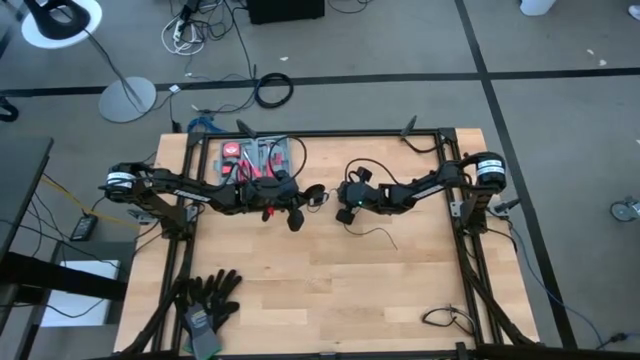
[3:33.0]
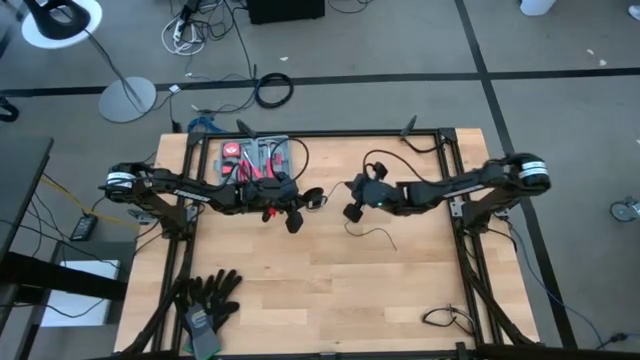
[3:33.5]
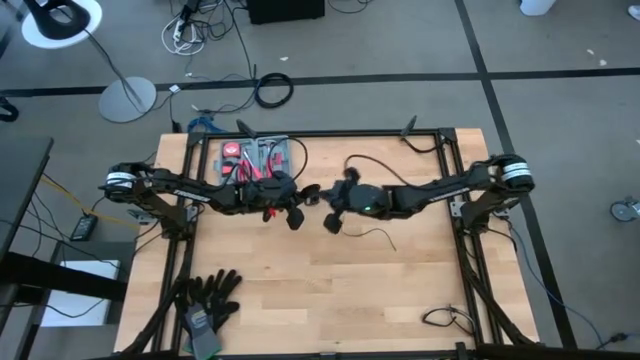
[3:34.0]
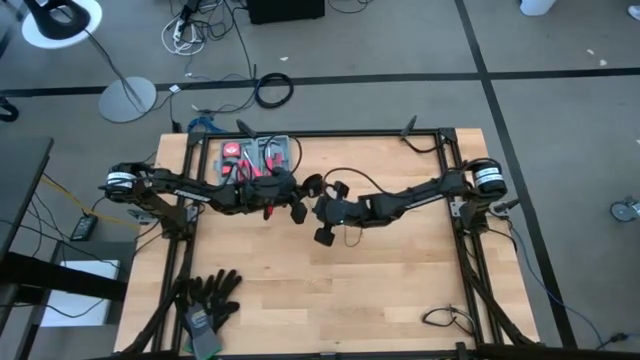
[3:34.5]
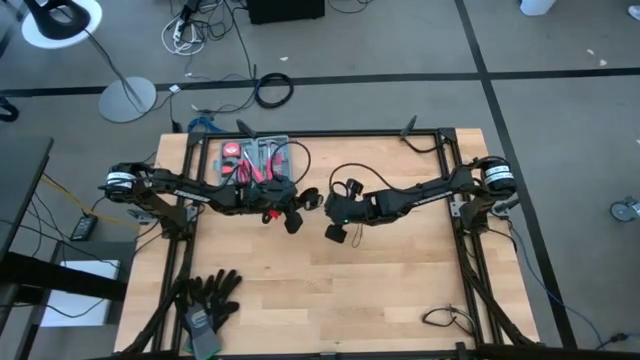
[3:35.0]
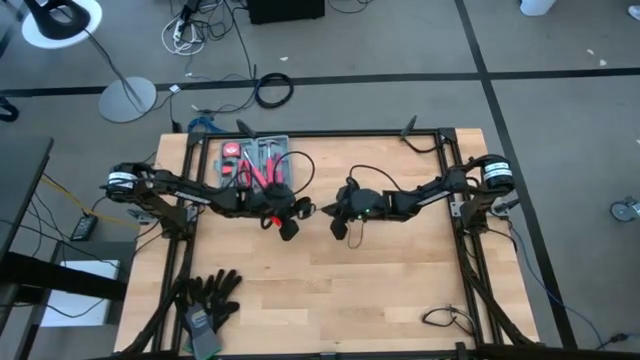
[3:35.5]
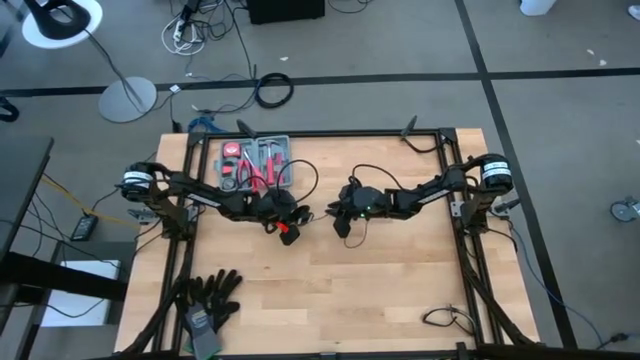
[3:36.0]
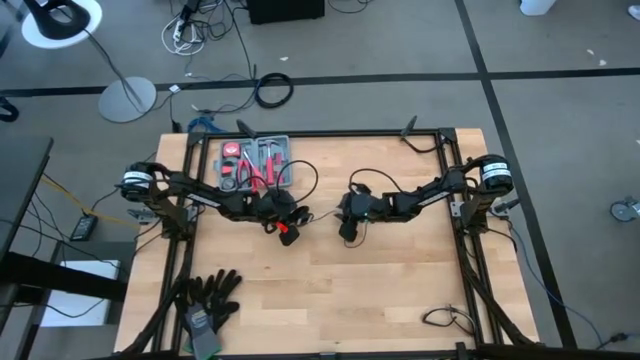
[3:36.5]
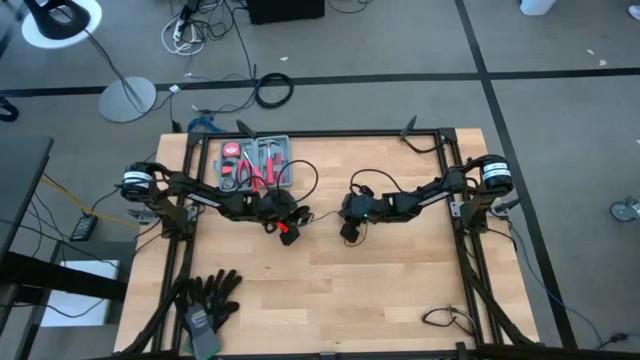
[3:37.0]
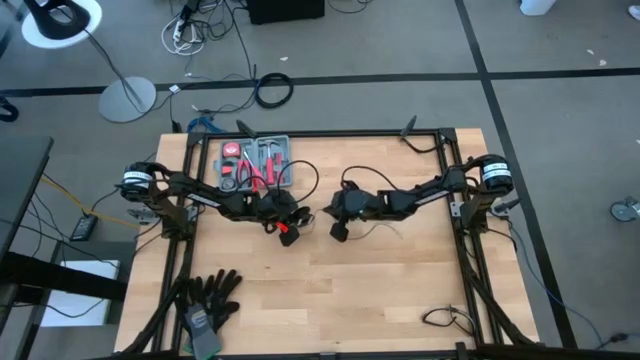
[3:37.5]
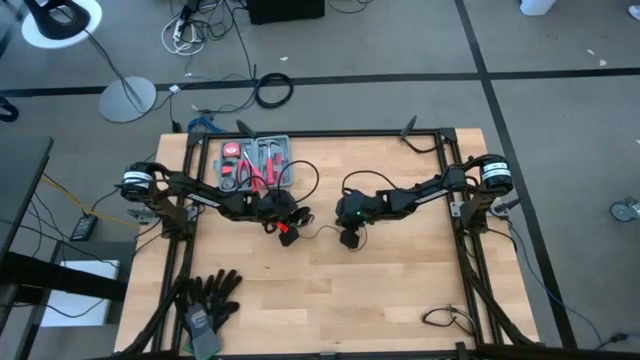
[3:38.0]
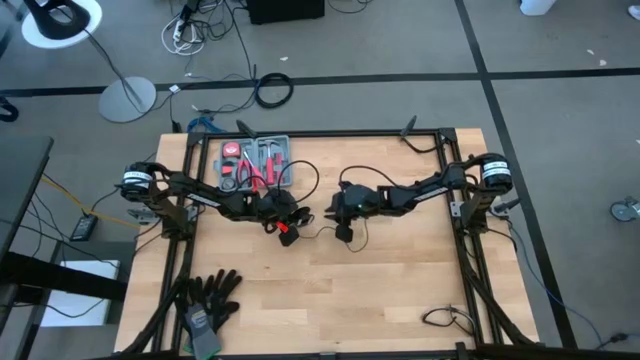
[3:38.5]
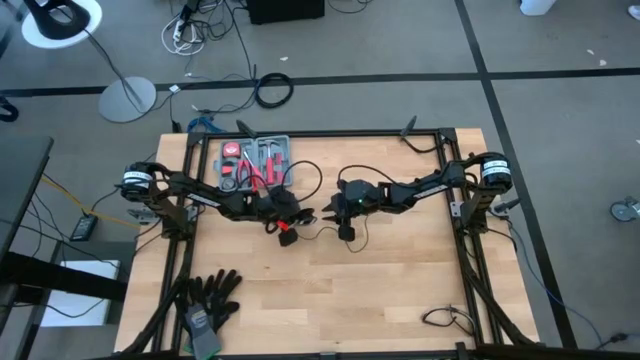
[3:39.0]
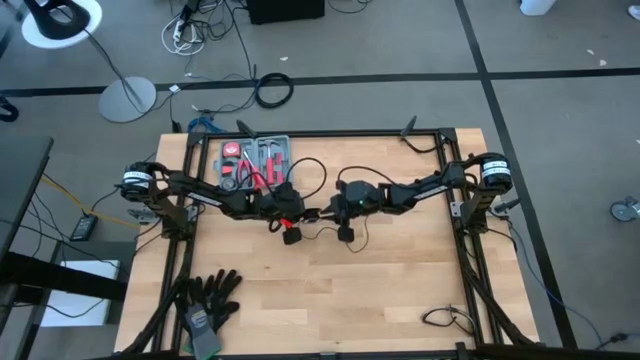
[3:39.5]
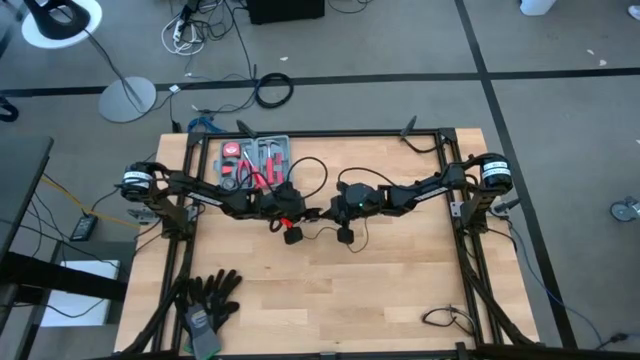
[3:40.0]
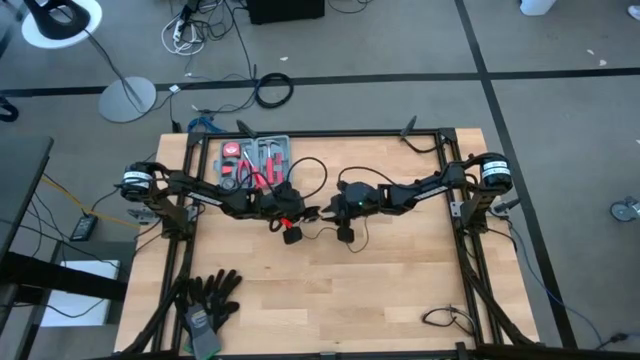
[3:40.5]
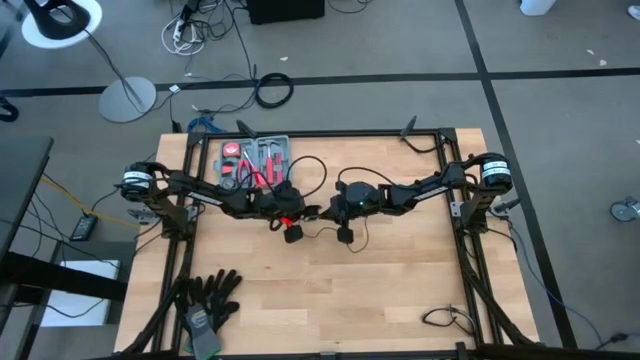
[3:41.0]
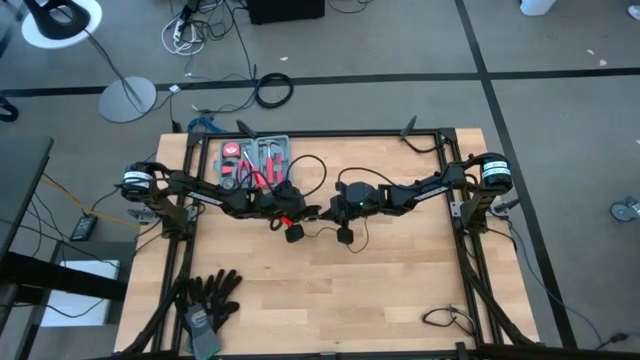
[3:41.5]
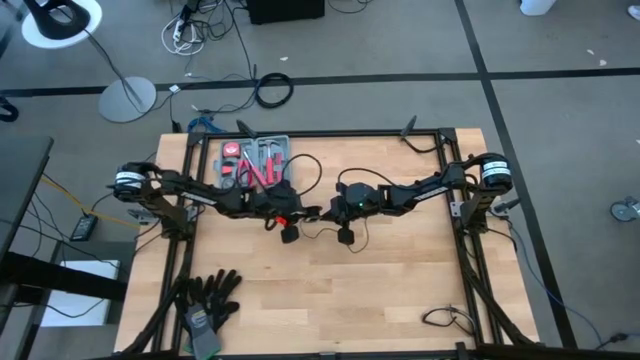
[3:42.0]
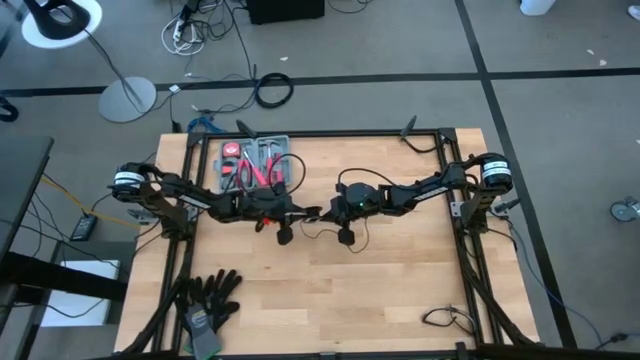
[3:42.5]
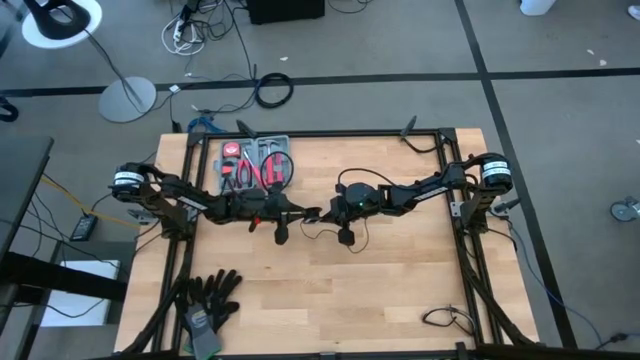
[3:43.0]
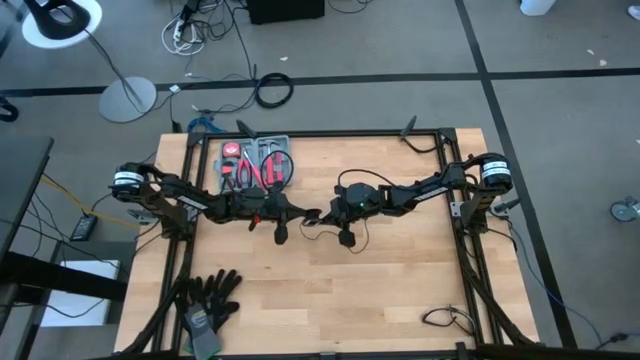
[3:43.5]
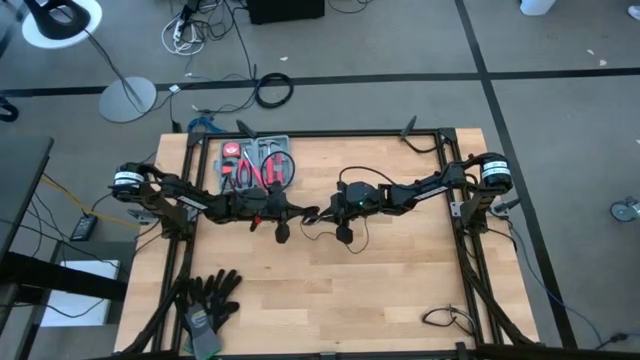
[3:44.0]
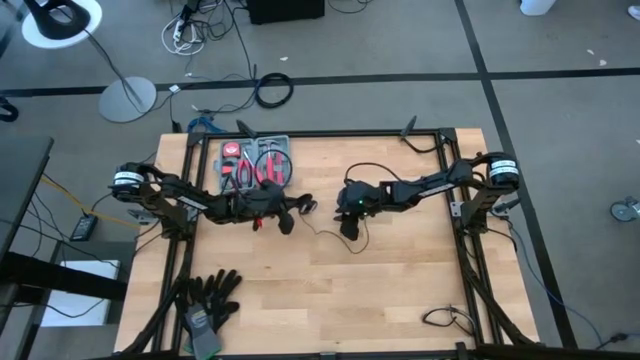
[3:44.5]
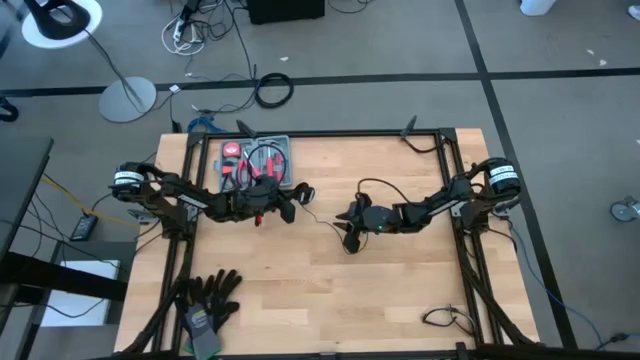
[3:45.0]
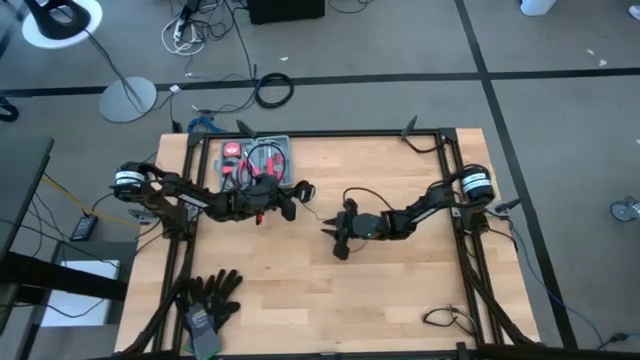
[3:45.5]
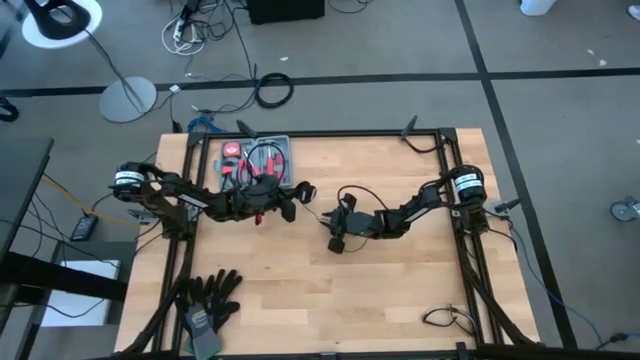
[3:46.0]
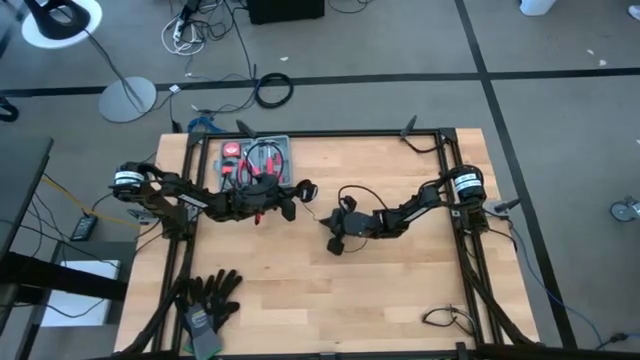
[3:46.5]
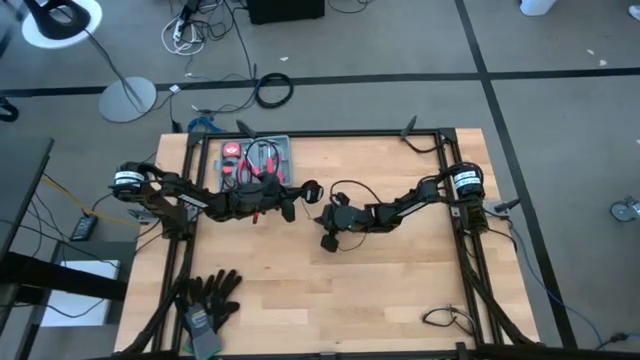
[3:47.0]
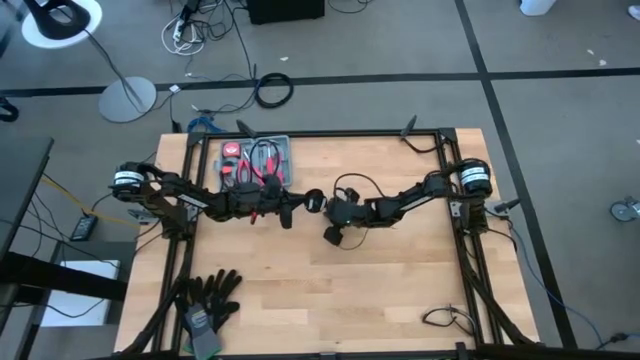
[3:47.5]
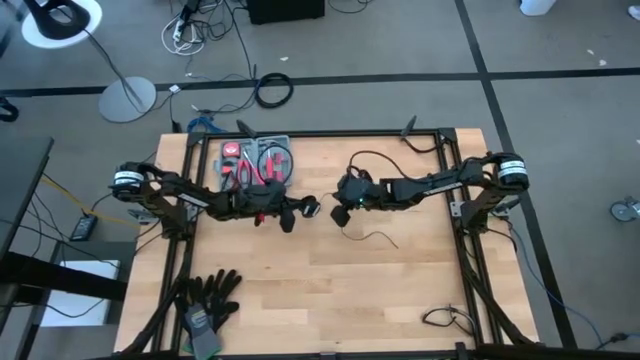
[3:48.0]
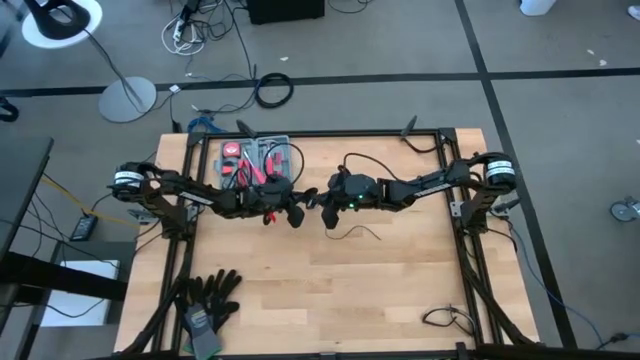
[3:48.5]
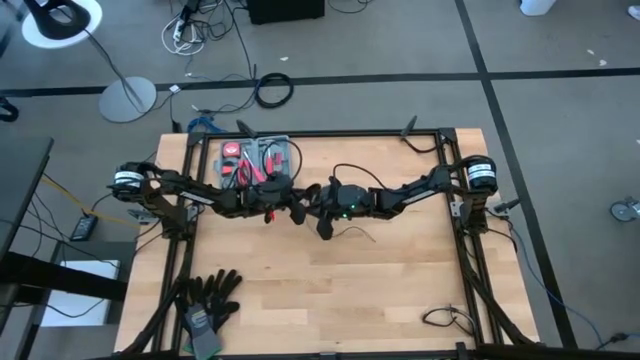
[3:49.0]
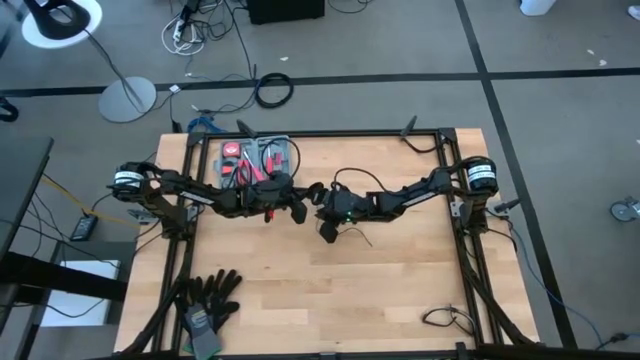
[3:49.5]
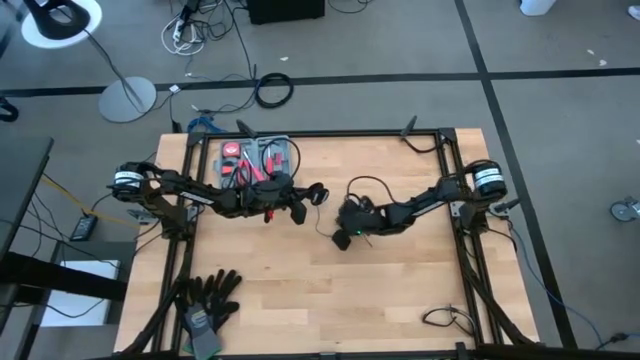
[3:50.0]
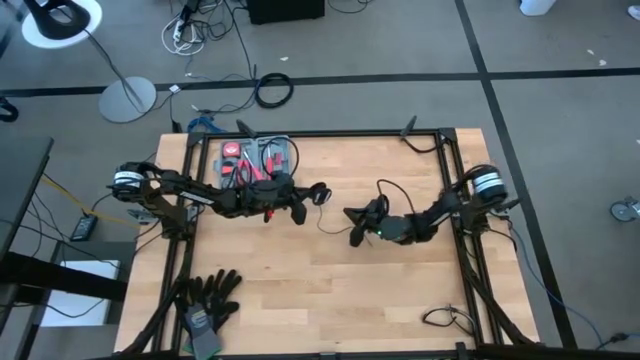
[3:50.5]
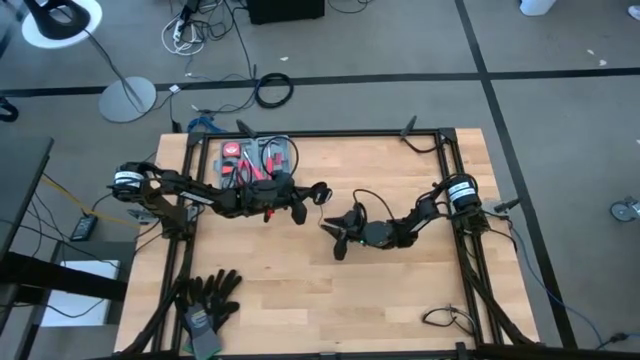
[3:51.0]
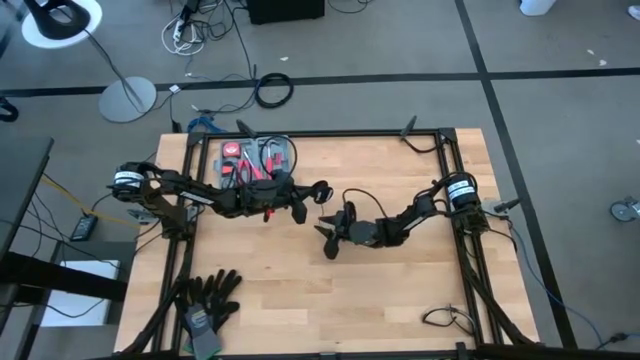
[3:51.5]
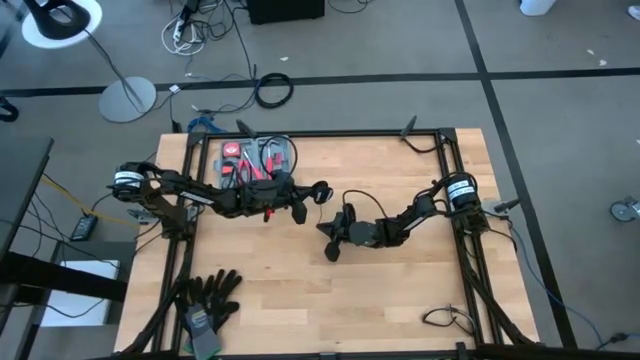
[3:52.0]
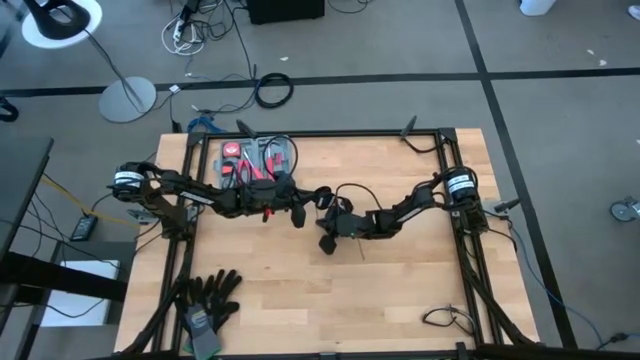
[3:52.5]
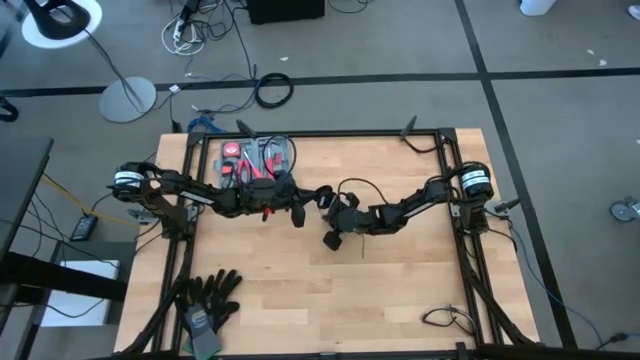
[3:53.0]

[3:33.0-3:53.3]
Task: Coil cords
Coil the black cable wire on the spool
